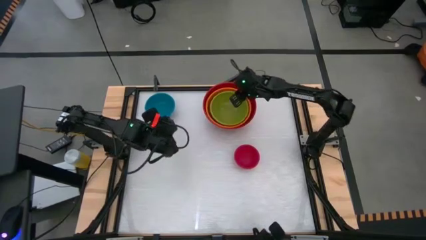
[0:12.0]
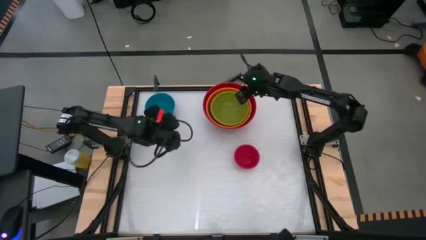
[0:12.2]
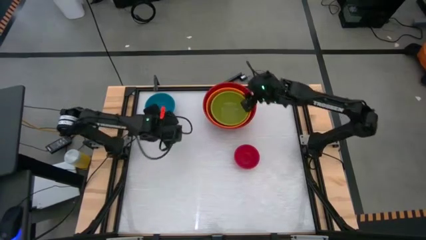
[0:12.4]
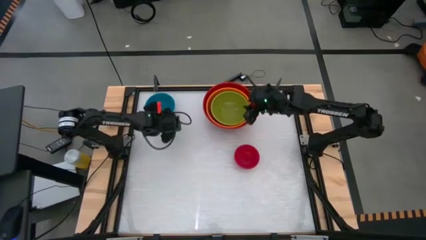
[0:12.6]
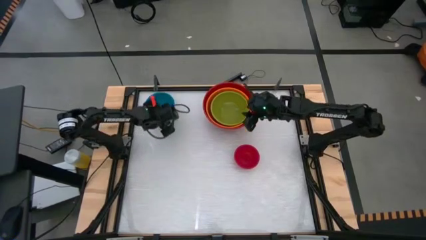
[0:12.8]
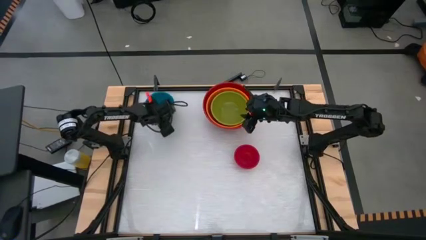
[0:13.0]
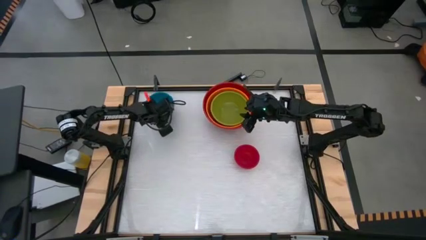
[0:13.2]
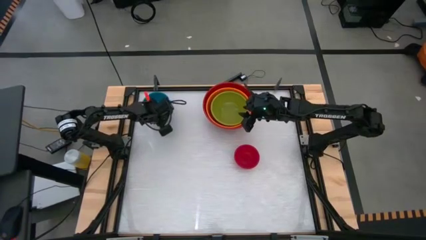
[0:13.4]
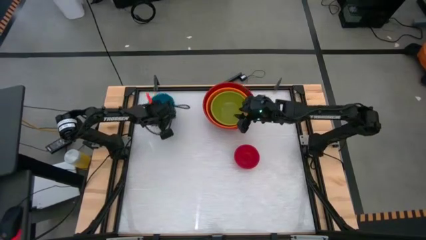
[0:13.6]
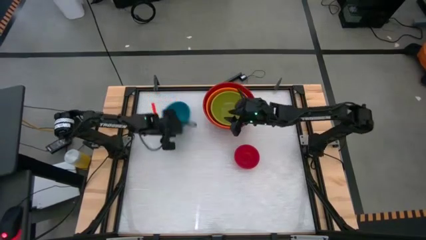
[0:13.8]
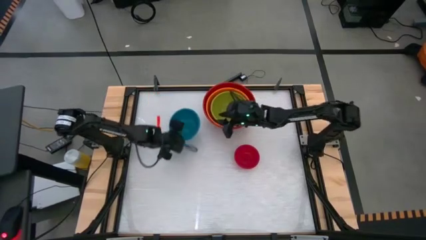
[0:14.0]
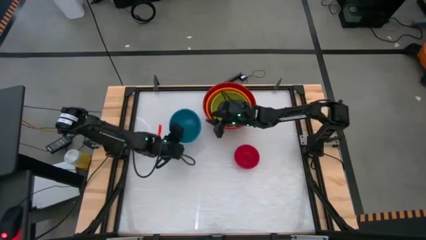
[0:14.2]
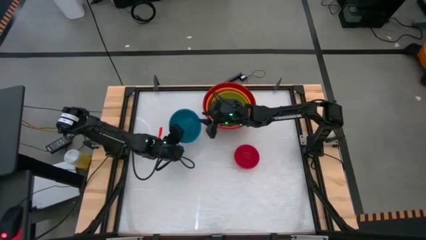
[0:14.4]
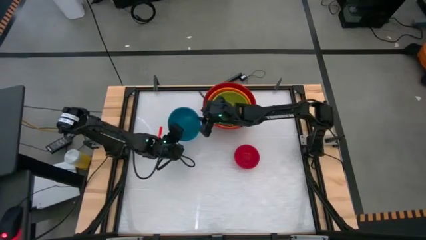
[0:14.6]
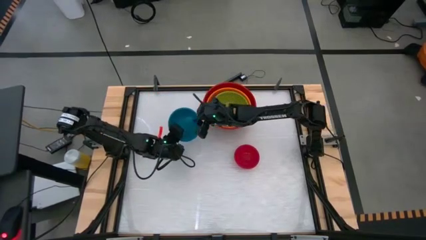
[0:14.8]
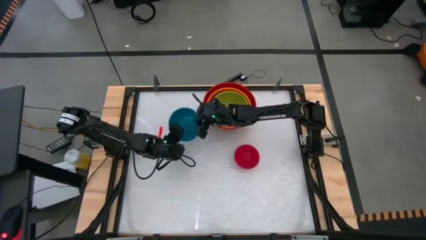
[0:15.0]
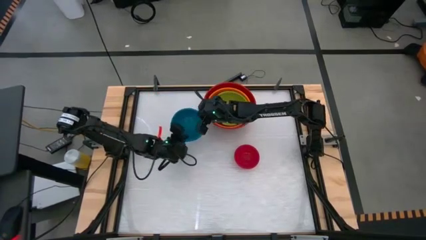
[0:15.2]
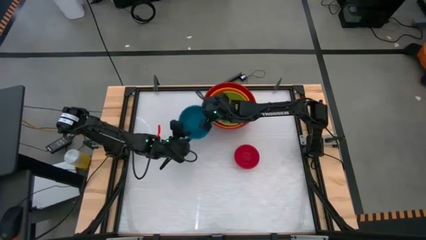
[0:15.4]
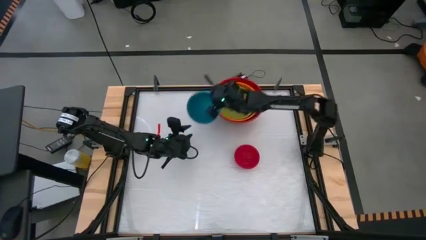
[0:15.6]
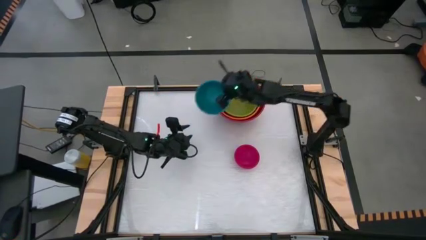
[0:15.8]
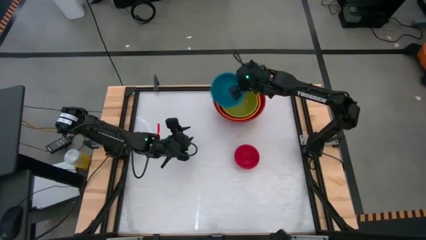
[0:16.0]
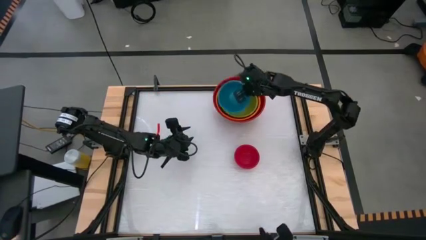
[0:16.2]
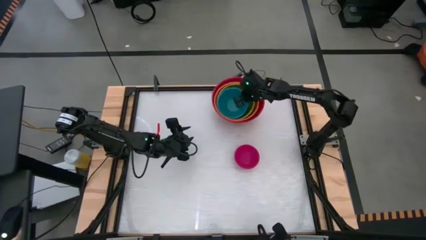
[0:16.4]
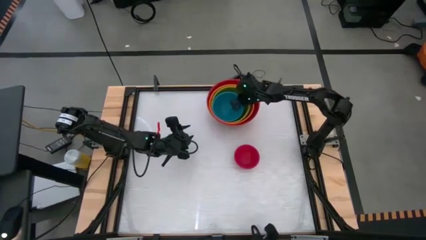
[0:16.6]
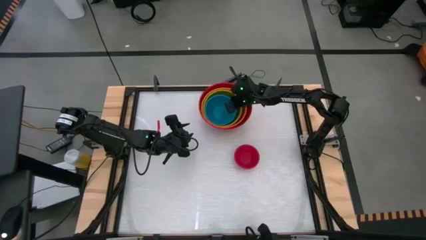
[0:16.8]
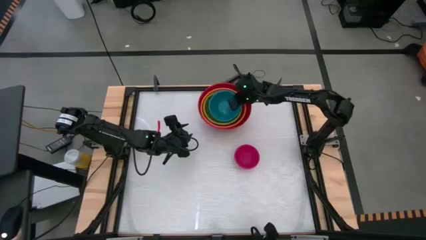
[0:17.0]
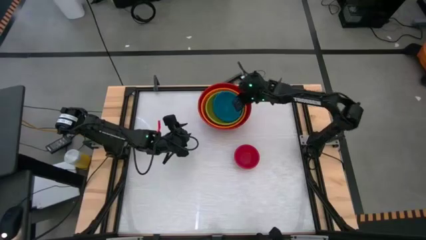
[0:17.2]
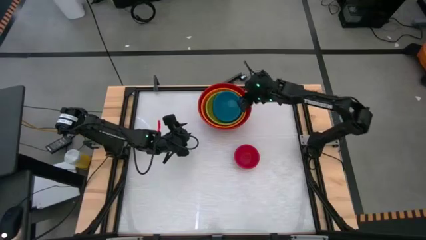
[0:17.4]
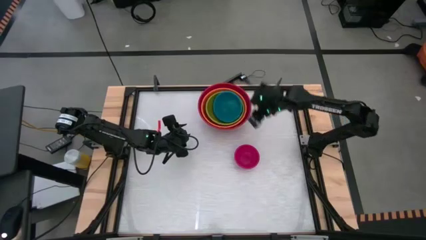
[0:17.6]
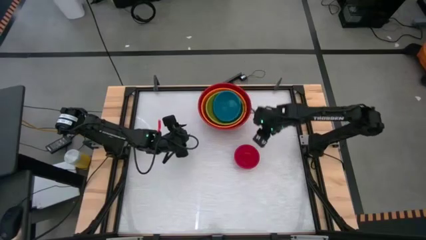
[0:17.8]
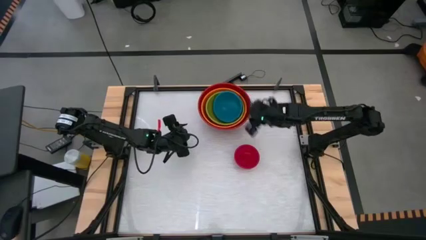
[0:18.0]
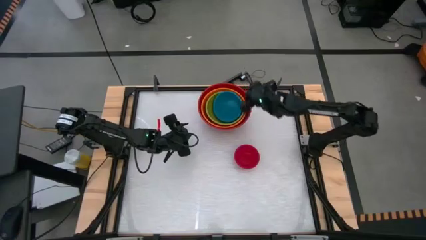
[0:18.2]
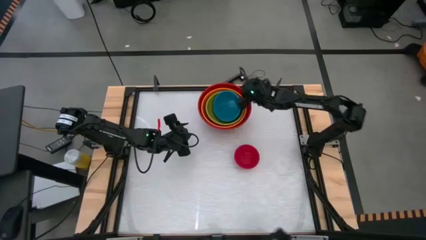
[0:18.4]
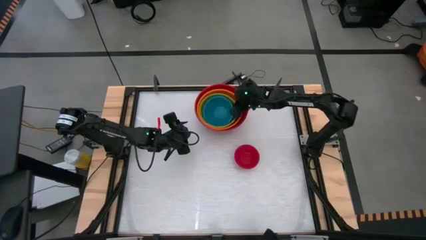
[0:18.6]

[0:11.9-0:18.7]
Stack the blue bowl on top of the green bowl

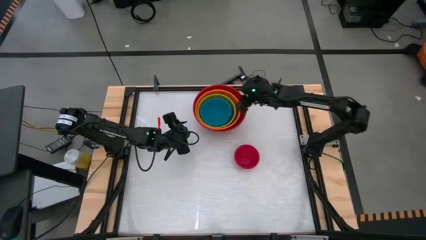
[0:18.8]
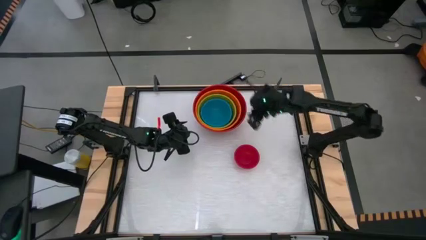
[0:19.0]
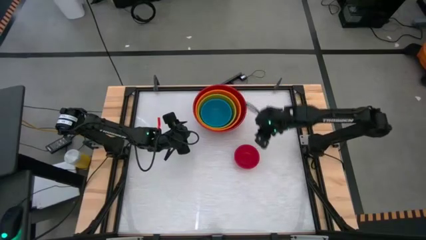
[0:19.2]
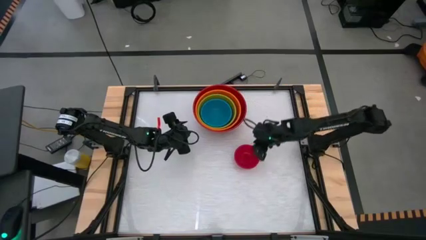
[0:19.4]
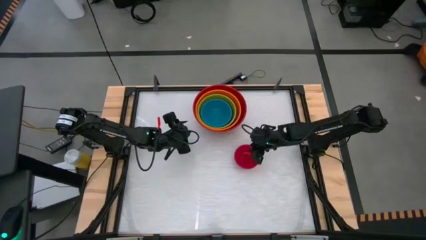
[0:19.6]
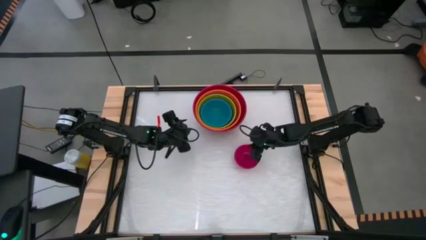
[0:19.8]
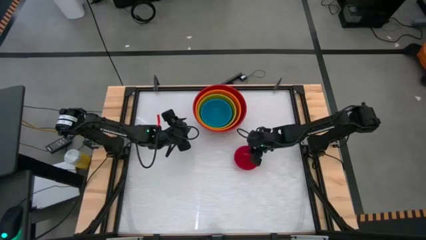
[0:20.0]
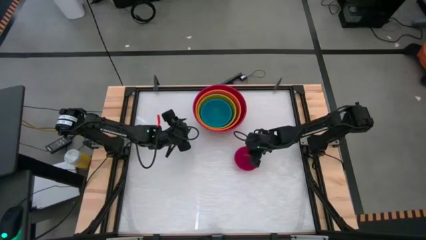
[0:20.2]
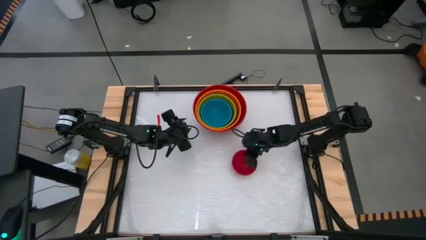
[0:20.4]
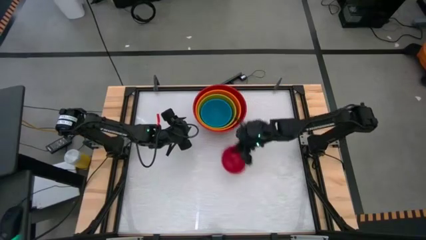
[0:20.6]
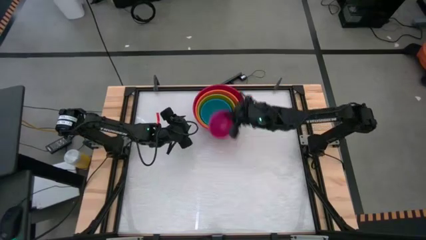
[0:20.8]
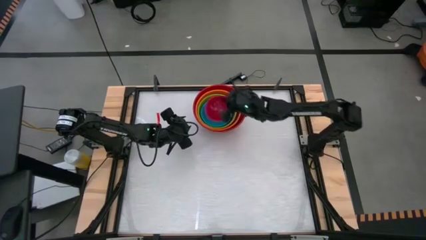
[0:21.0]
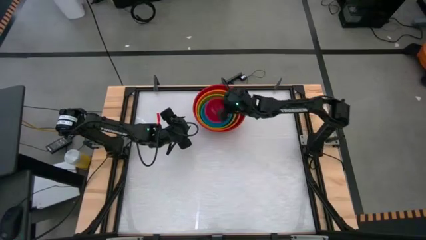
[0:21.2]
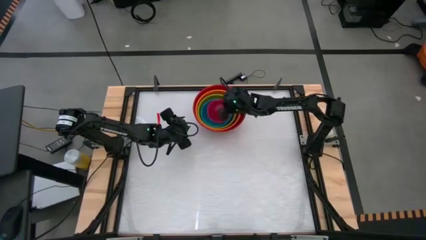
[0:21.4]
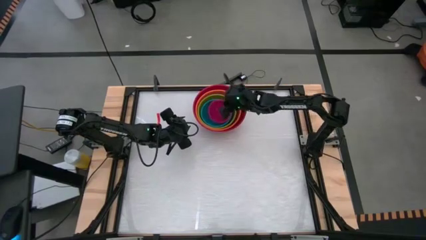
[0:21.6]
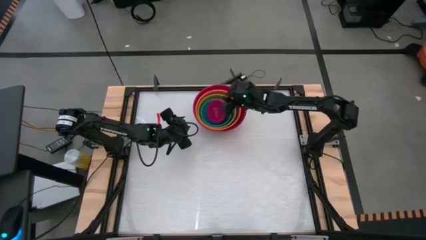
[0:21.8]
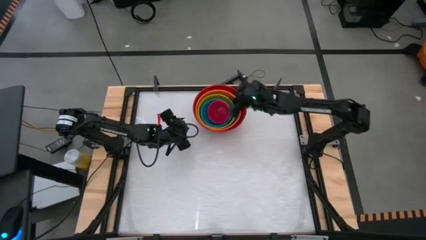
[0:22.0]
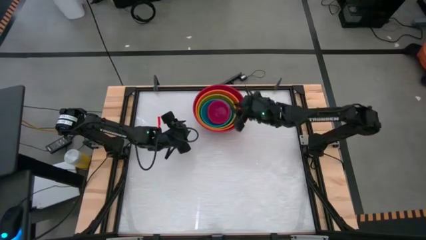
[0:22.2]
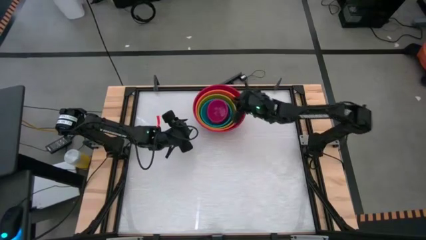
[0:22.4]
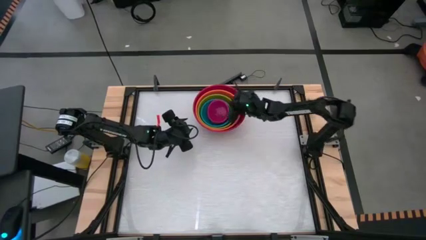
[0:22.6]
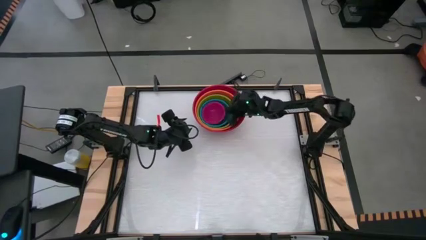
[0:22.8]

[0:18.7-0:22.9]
Stack the small red bowl on top of the blue bowl

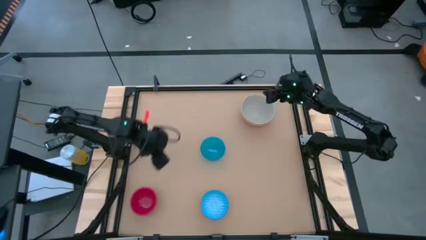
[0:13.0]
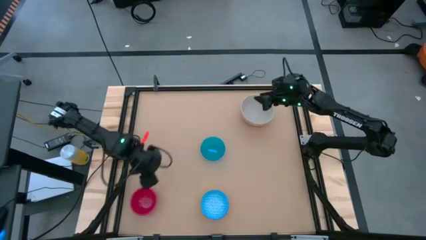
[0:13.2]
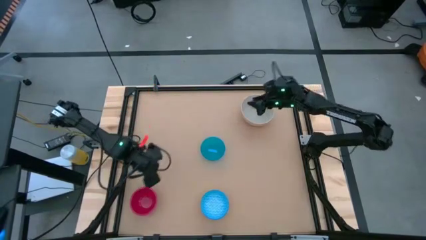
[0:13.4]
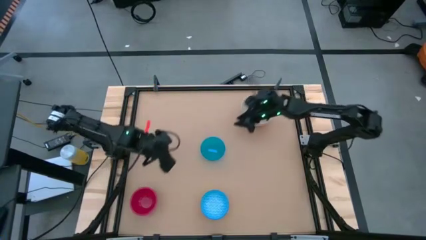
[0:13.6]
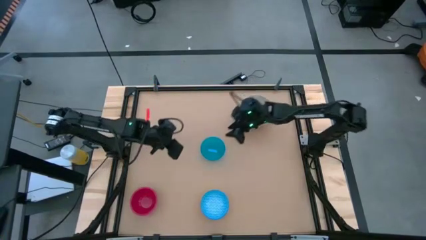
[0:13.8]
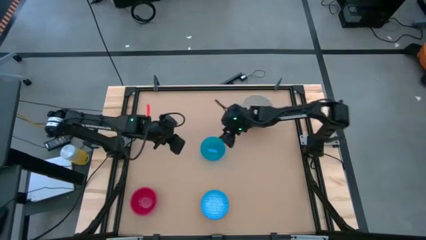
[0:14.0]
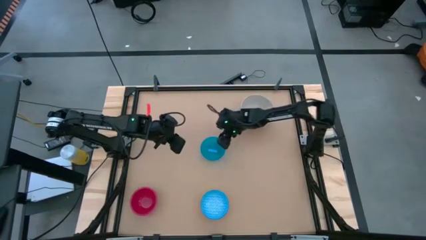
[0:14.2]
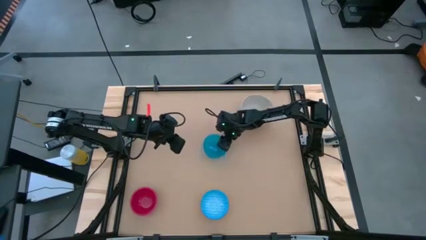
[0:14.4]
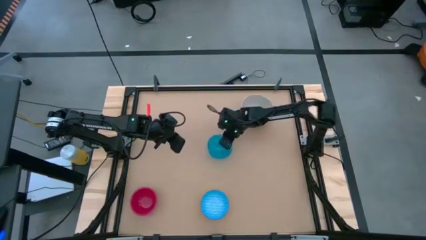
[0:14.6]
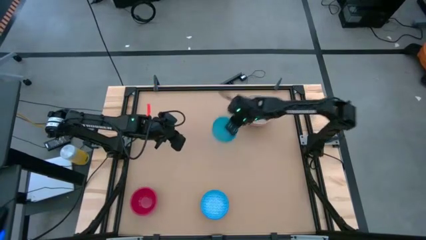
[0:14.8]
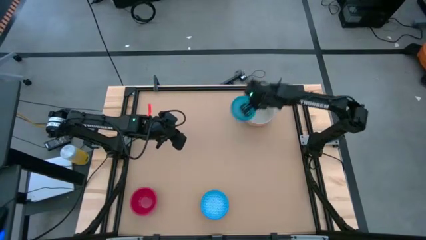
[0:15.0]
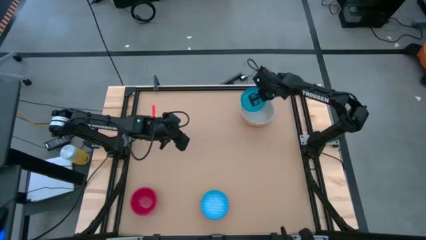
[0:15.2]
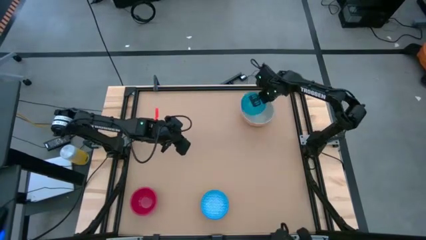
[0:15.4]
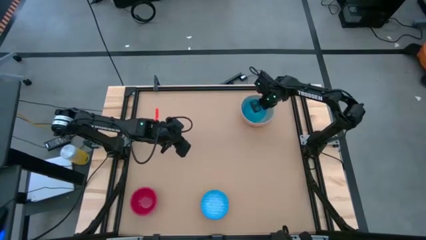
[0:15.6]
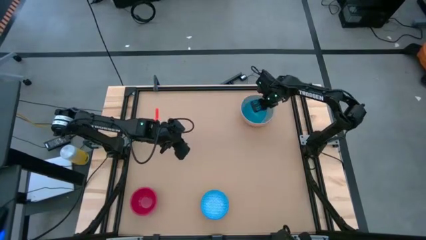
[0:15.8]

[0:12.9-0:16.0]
Stack the blue bowl on top of the white bowl

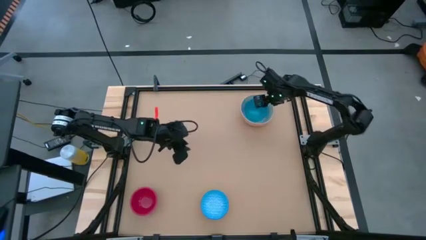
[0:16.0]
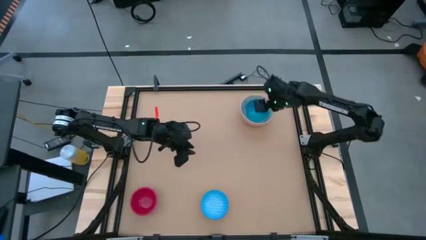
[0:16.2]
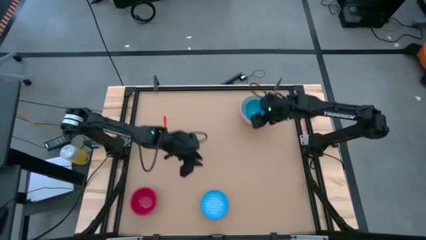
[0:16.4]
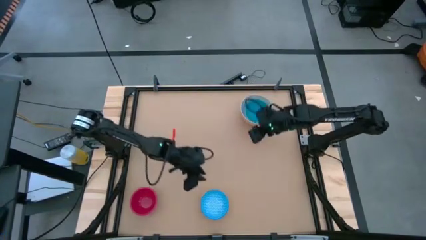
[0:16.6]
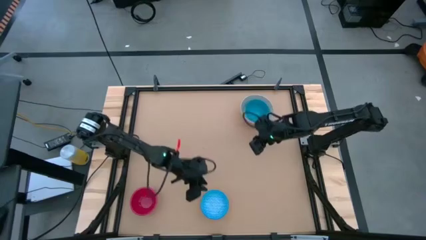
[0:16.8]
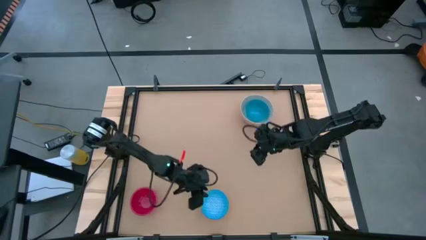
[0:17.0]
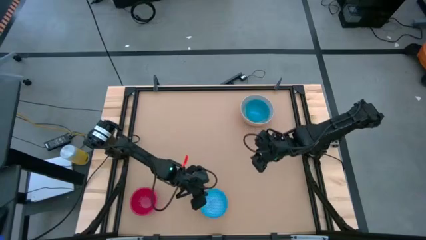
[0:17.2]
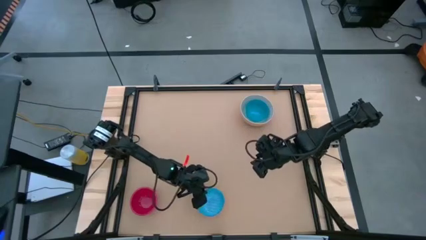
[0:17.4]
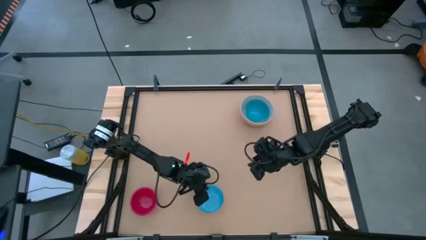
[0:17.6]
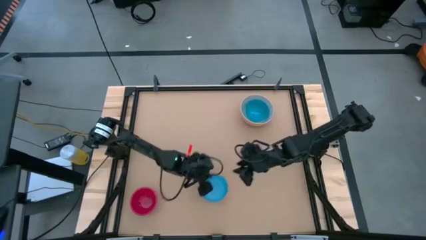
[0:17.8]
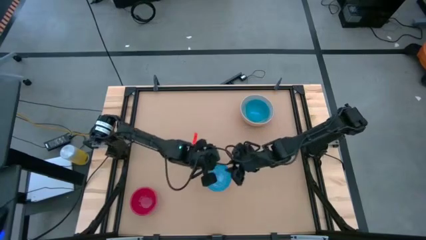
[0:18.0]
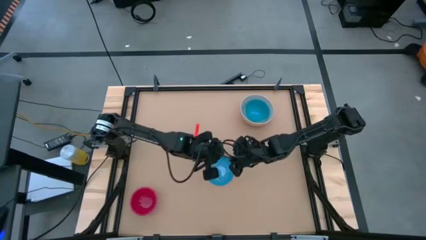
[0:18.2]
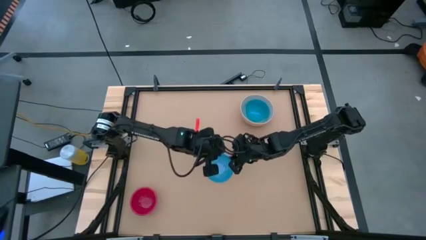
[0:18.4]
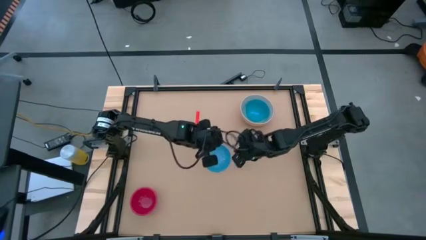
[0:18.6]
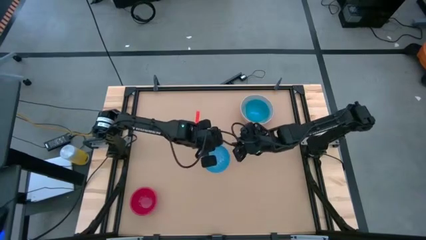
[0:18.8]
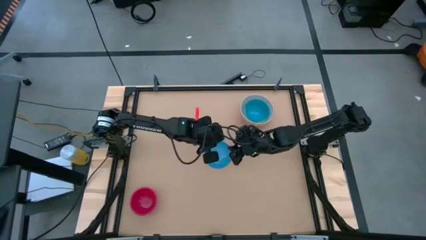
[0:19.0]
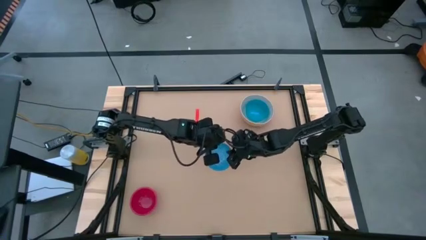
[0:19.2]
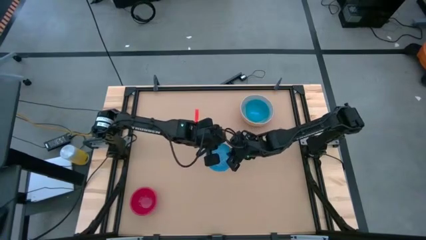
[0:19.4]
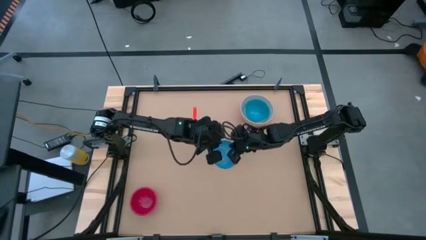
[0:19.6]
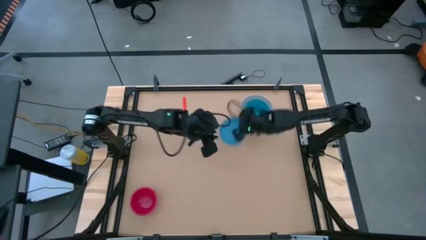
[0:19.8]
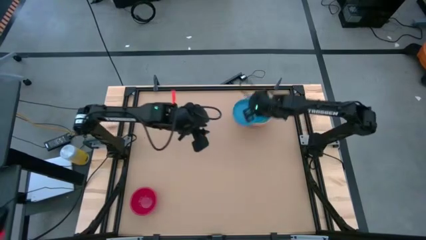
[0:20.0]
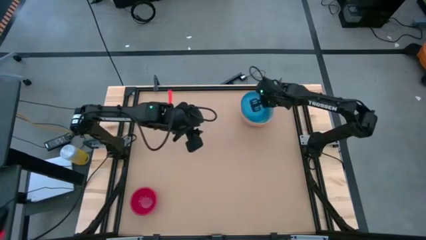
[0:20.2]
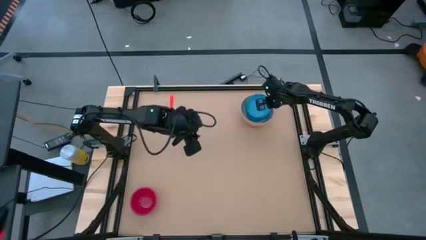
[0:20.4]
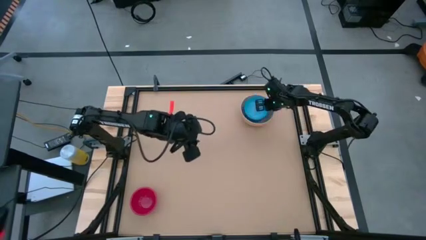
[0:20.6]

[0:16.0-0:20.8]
Stack the blue patterned bowl on top of the blue bowl
